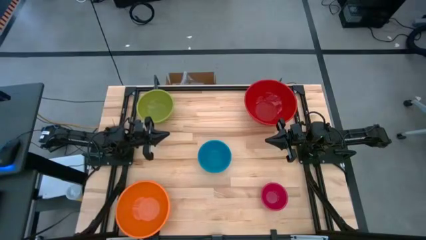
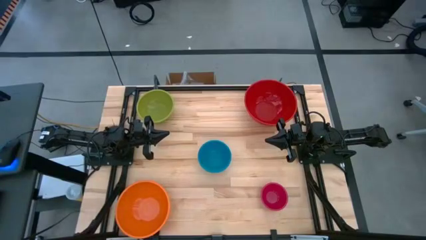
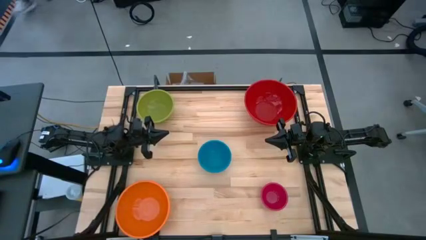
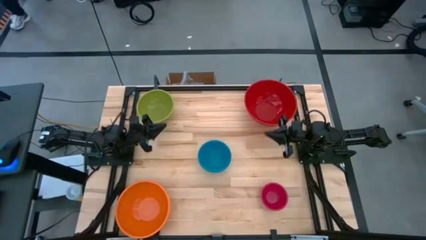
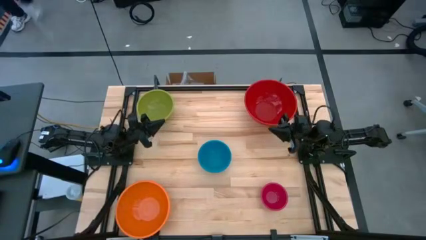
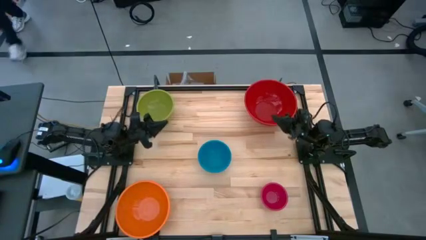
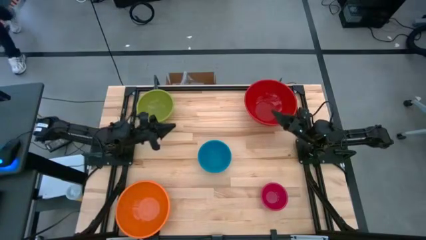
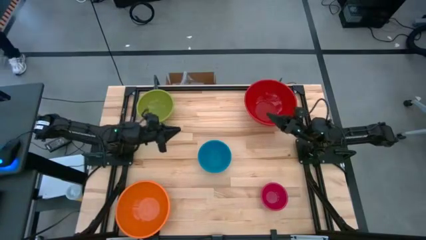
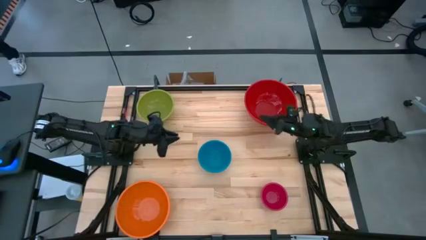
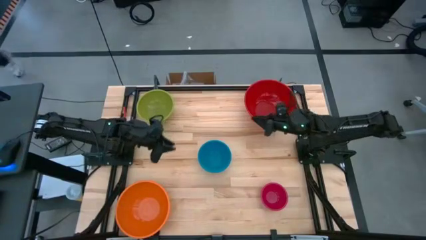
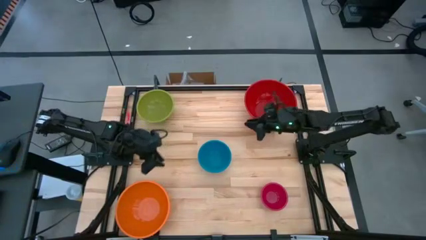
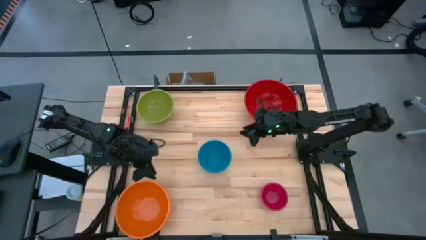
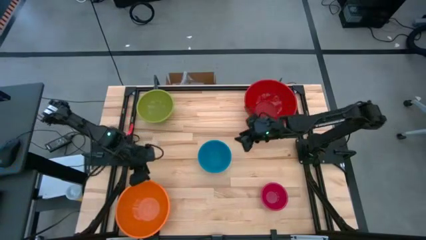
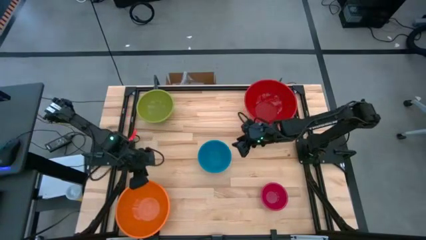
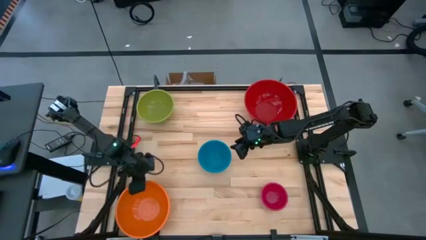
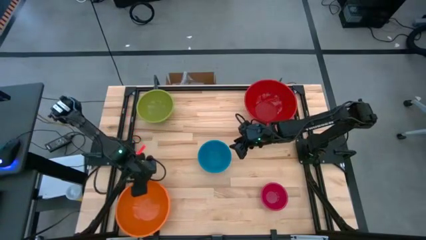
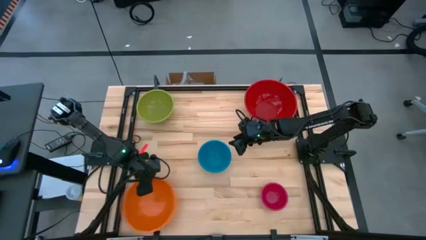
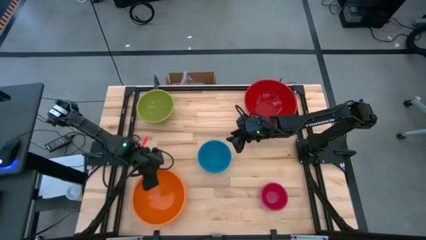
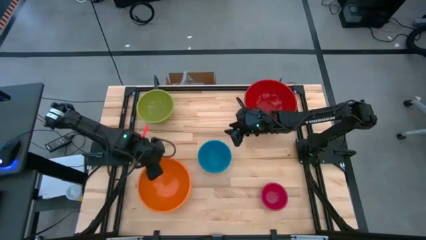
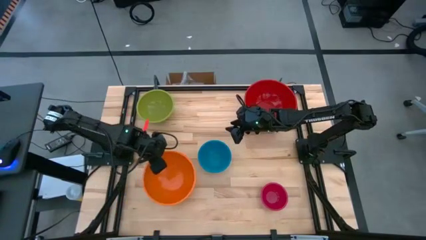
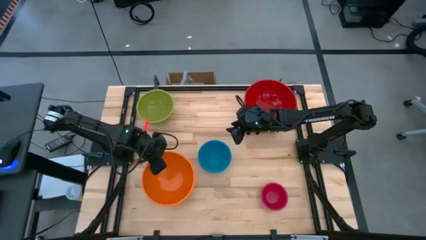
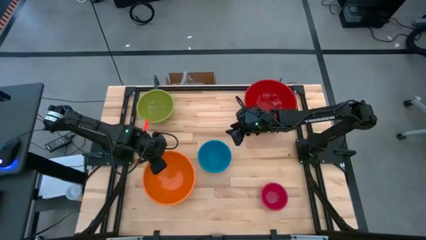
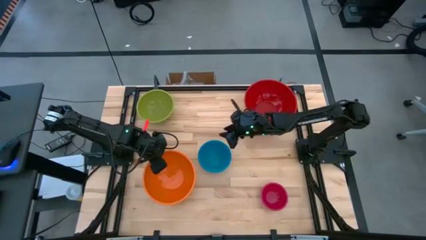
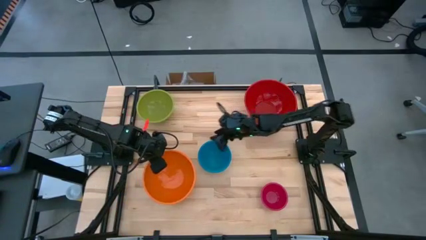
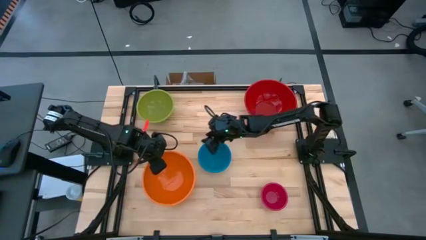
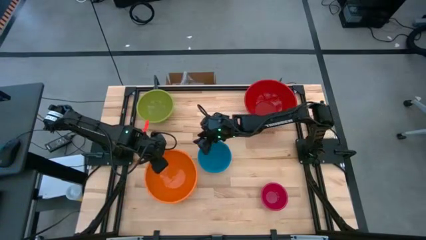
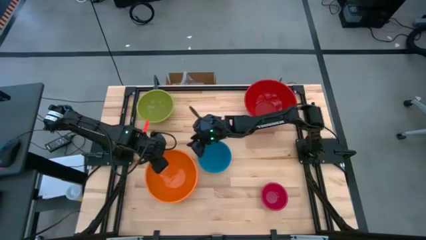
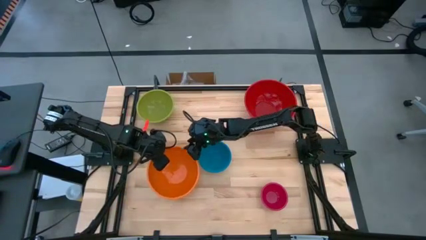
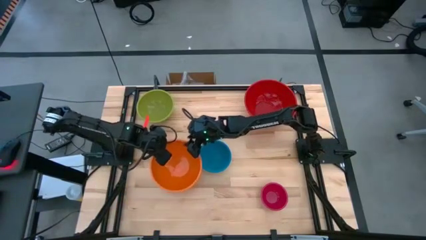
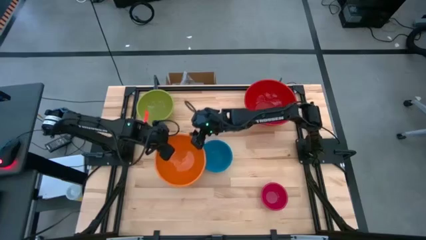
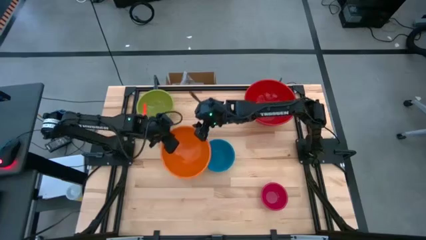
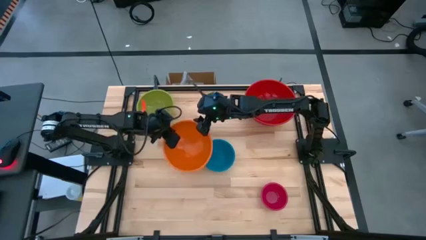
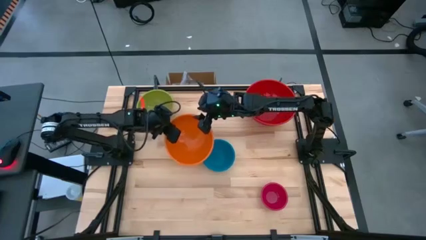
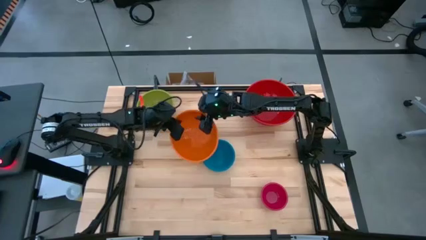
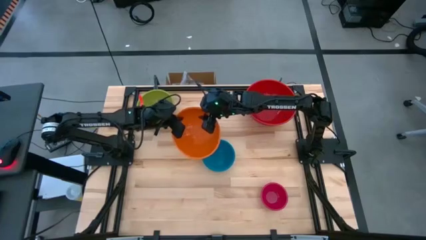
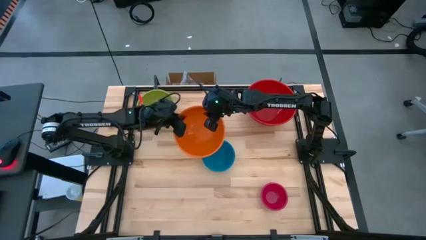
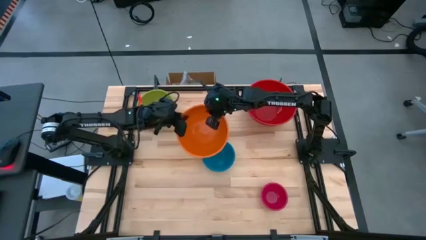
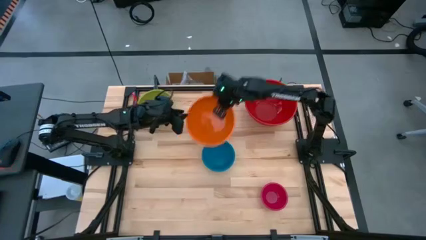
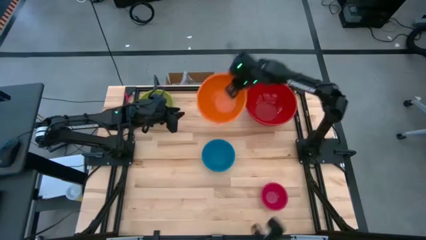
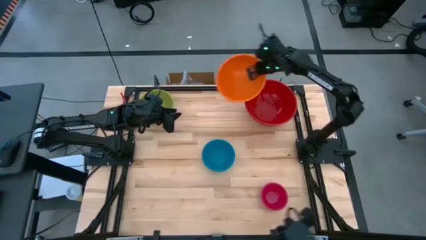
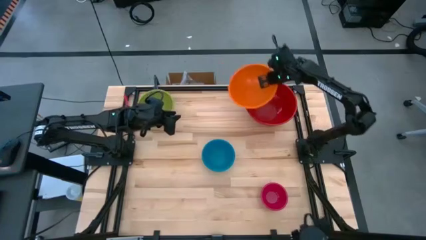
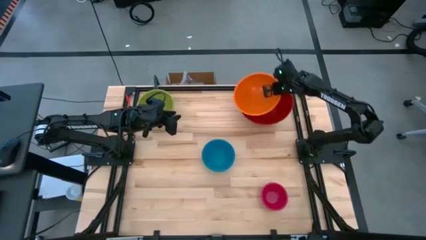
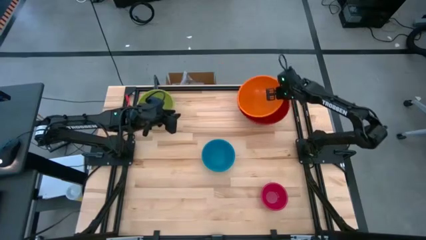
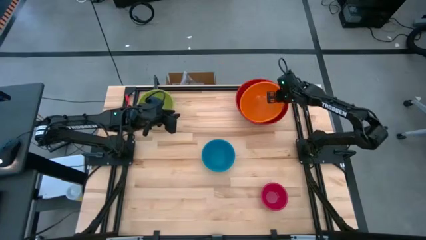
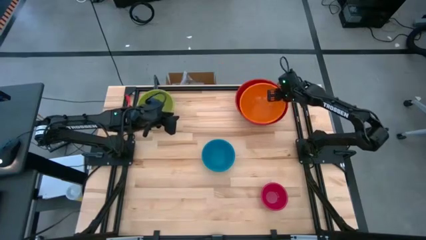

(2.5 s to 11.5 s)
Stack the orange bowl on top of the red bowl

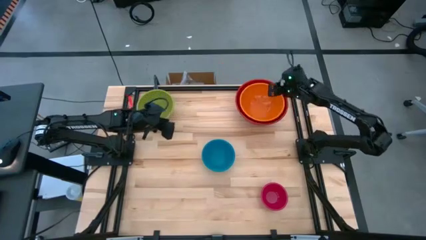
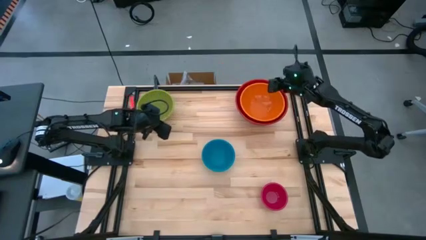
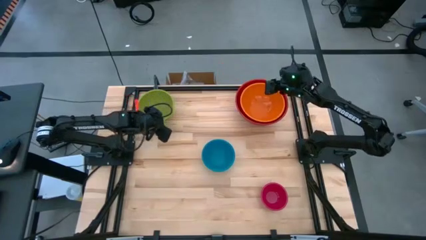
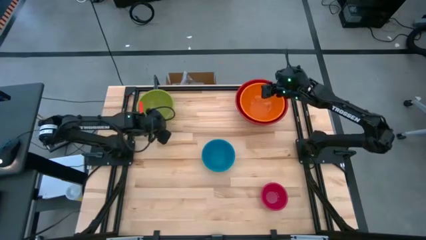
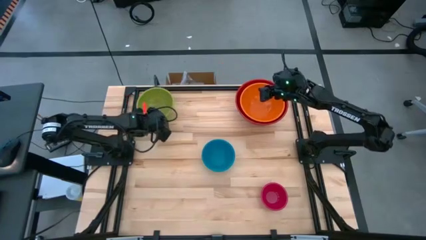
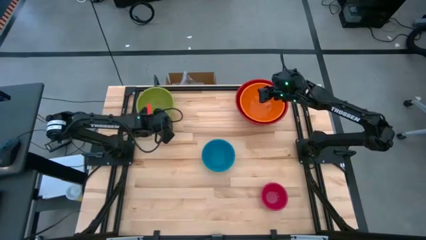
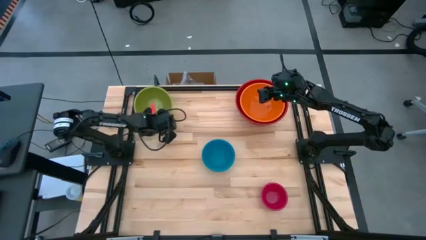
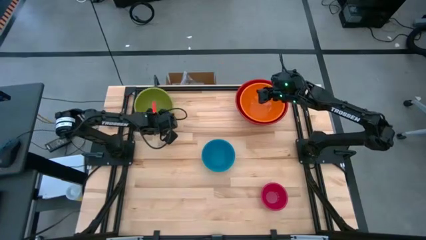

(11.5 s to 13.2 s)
Stack the green bowl on top of the orange bowl

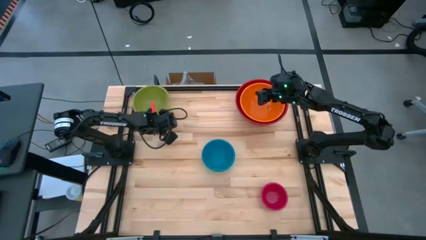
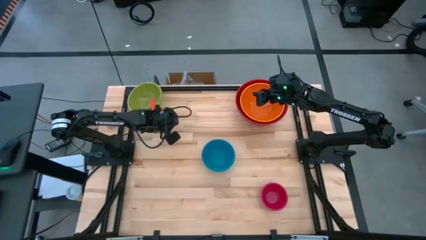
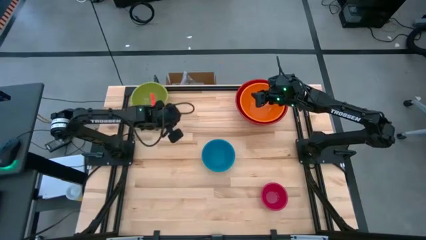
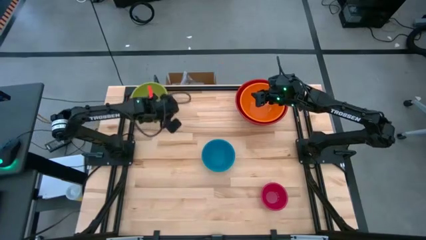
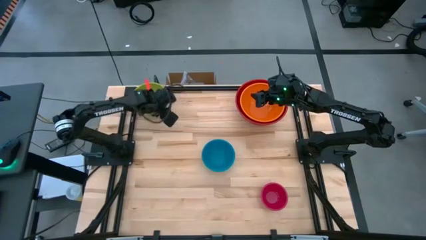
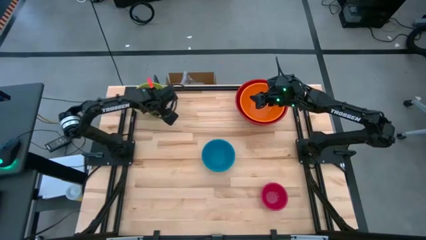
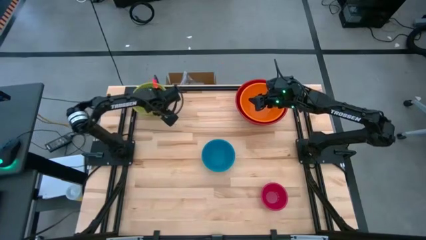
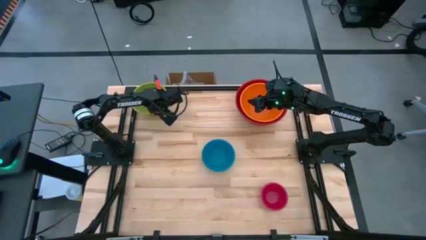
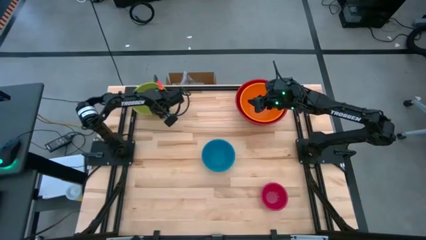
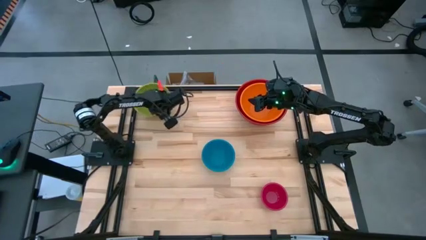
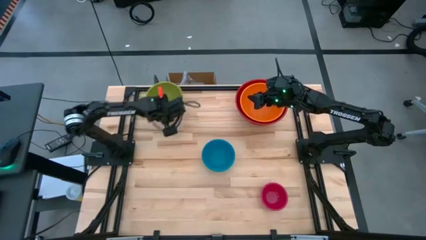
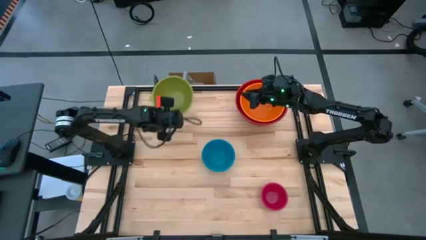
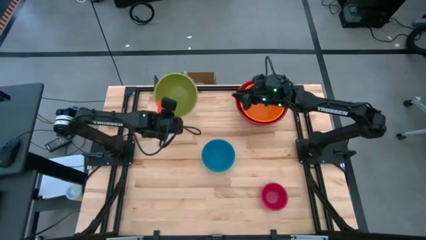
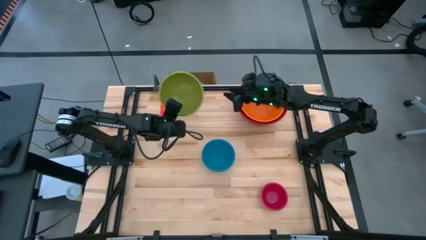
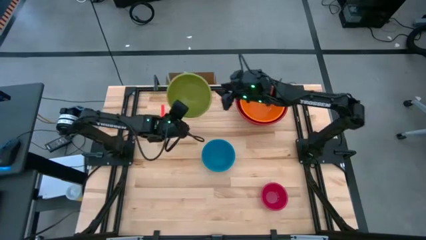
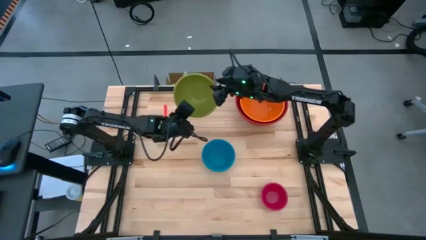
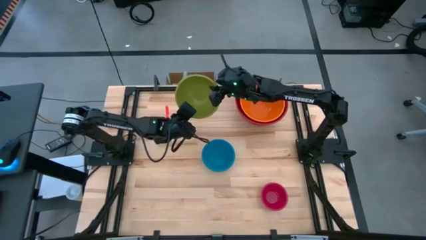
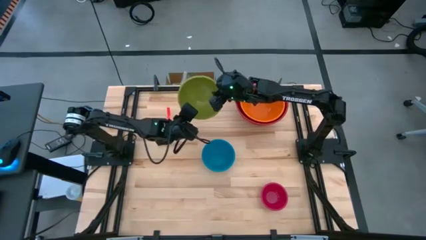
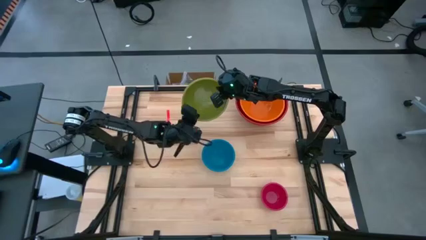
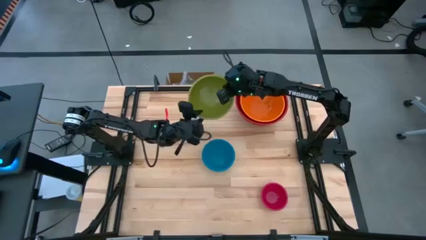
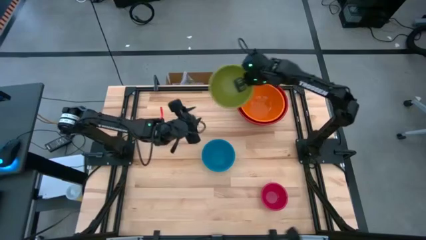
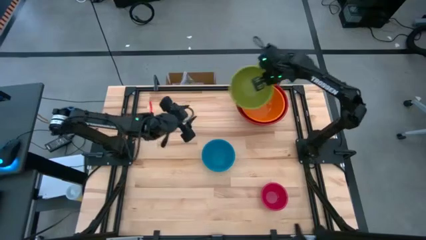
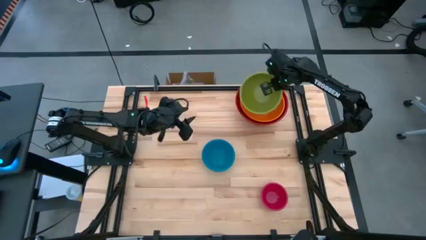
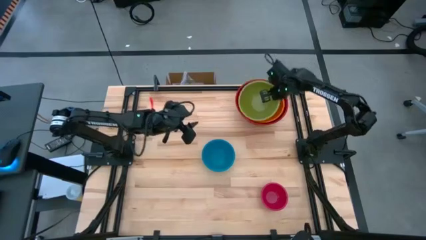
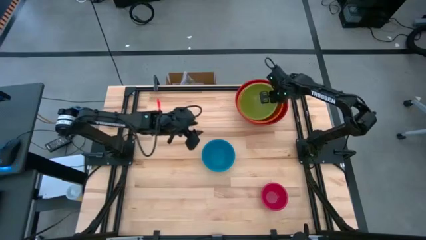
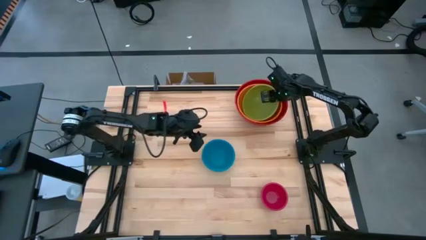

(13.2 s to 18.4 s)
Stack the green bowl on top of the orange bowl
